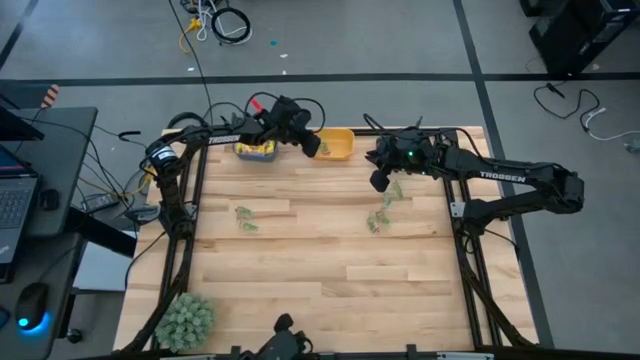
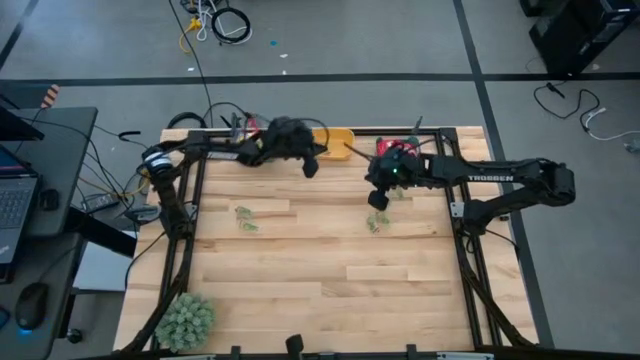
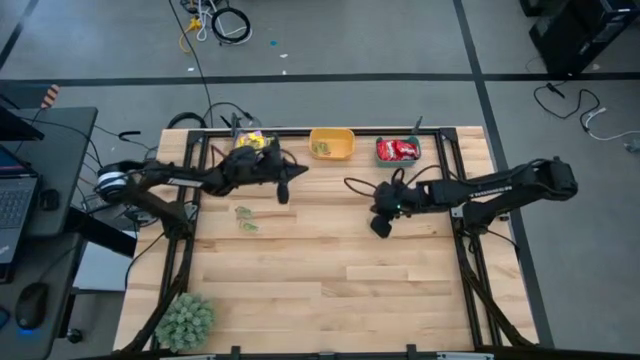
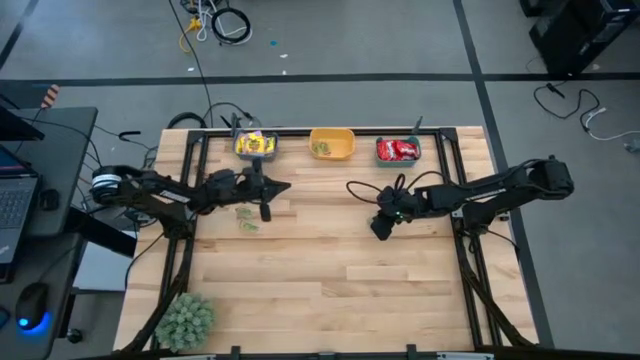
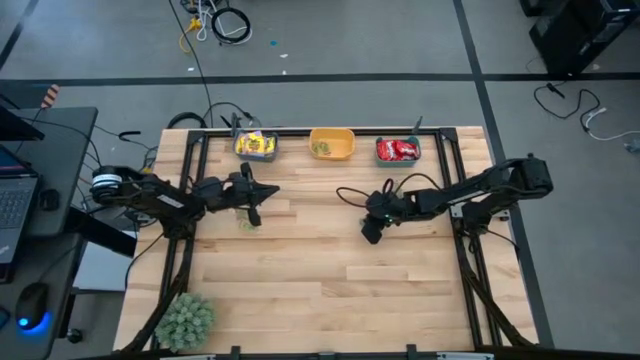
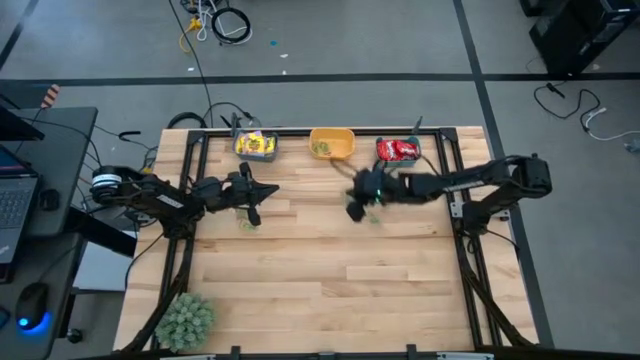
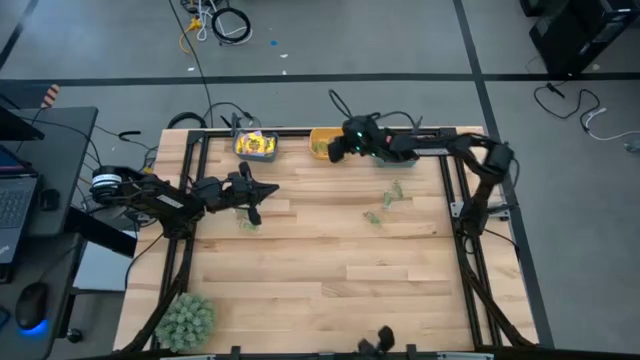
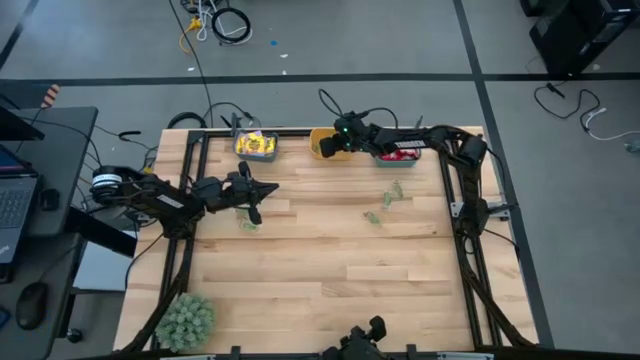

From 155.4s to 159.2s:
Task: Sort candy
Put the green gummy into the yellow bin

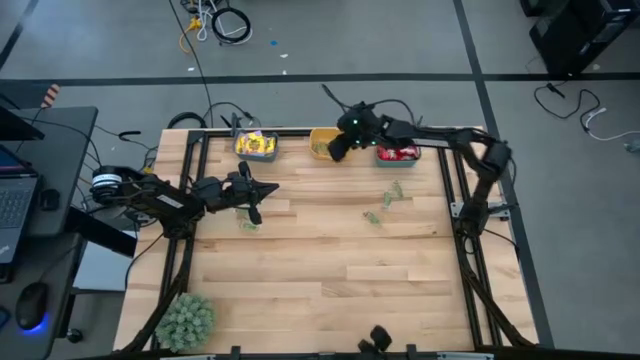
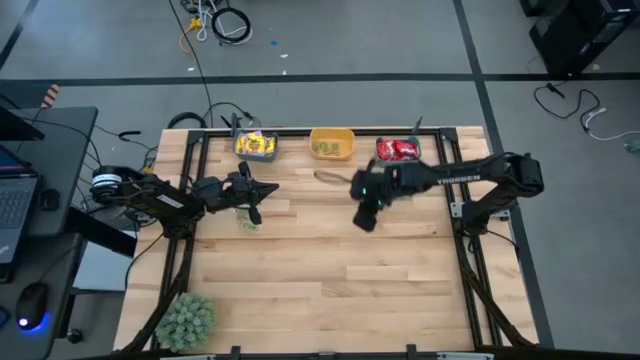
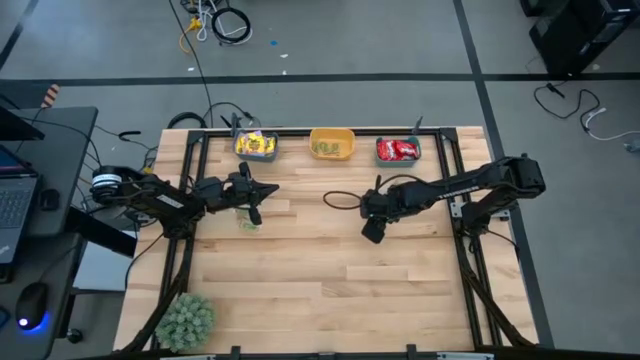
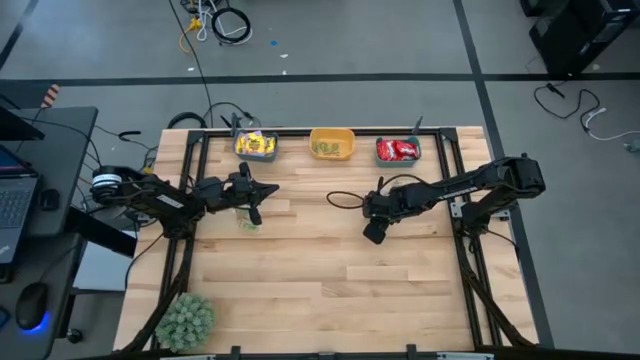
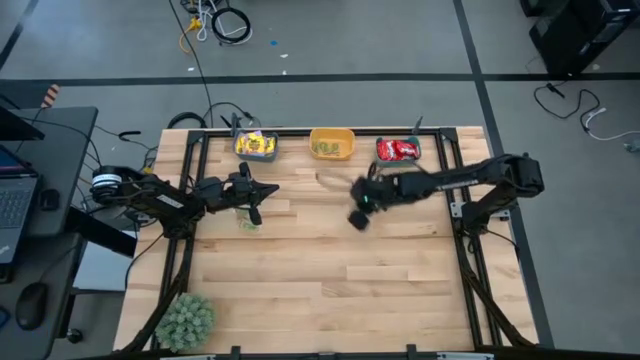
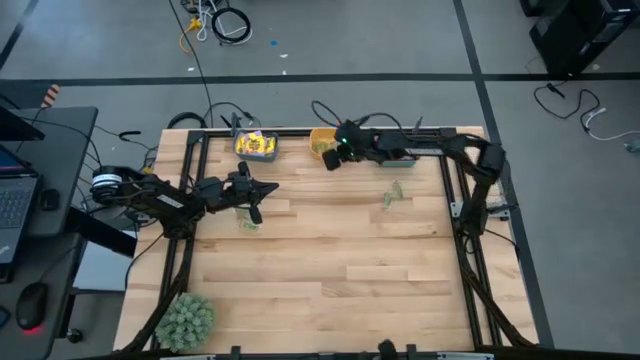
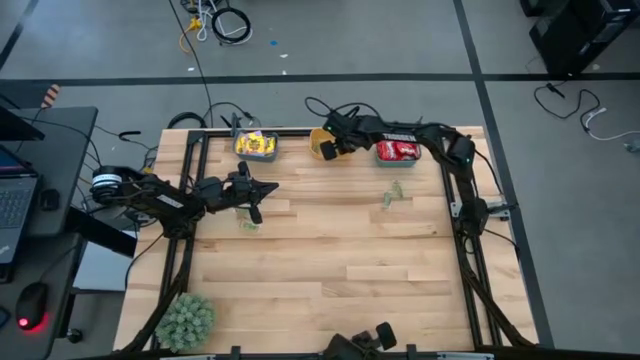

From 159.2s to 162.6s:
Put the green gummy into the yellow bin

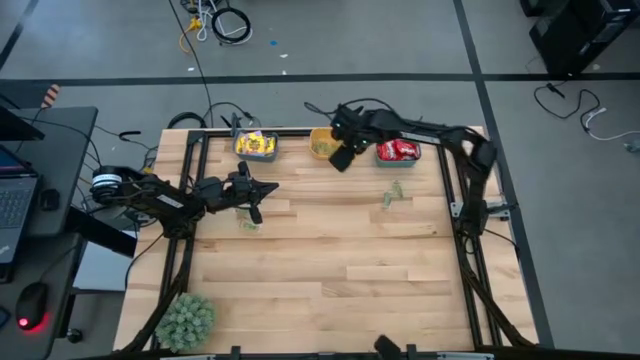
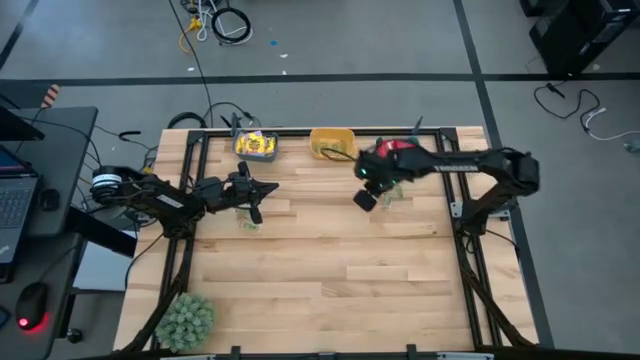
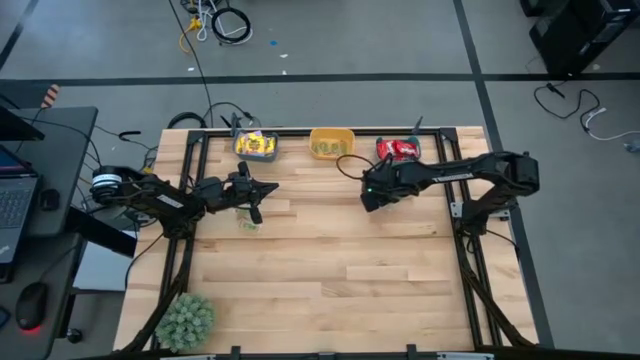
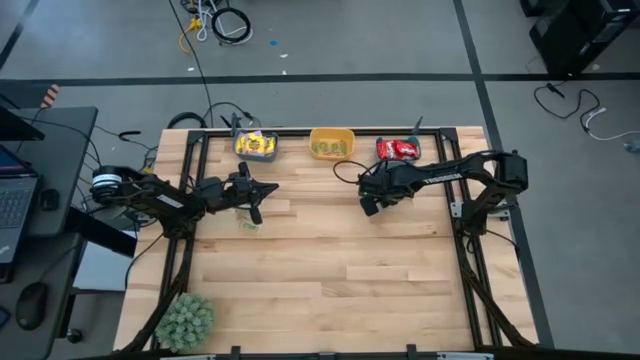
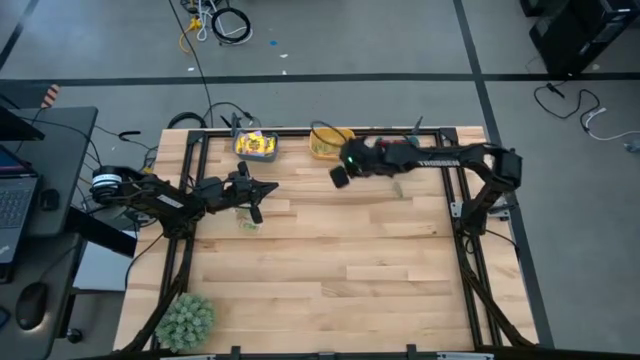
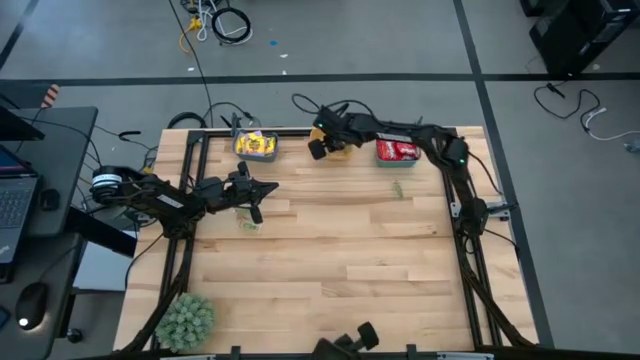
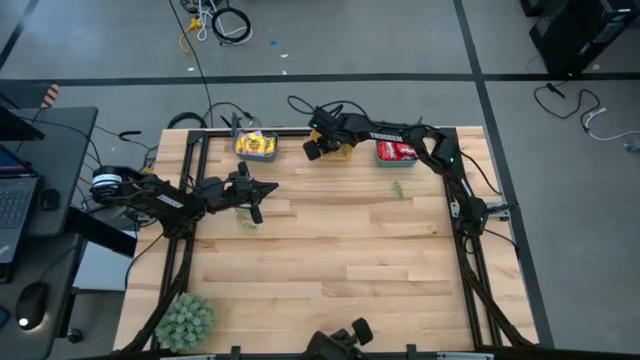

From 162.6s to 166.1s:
Put the green gummy into the yellow bin

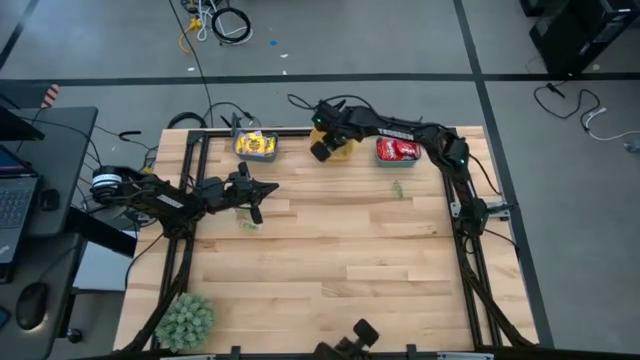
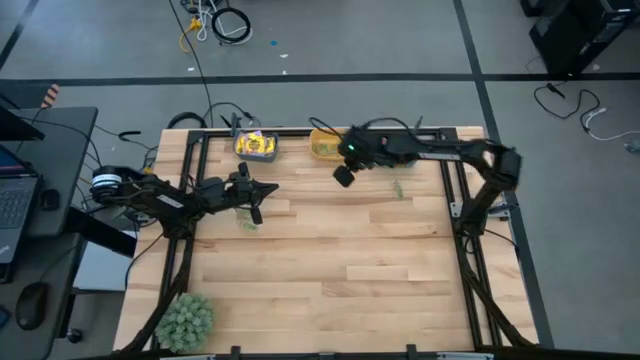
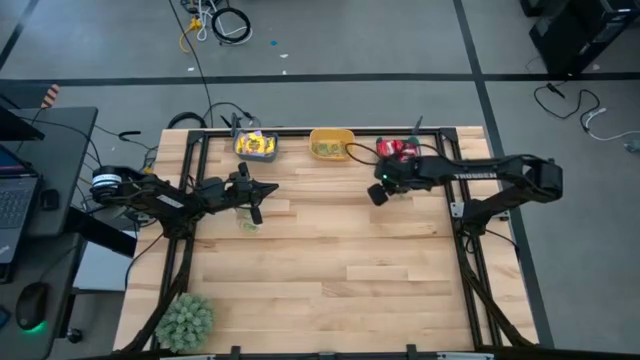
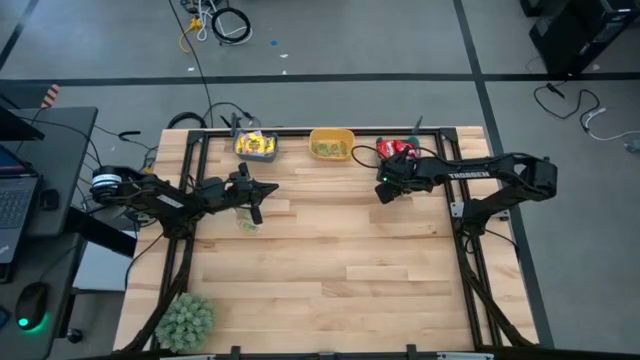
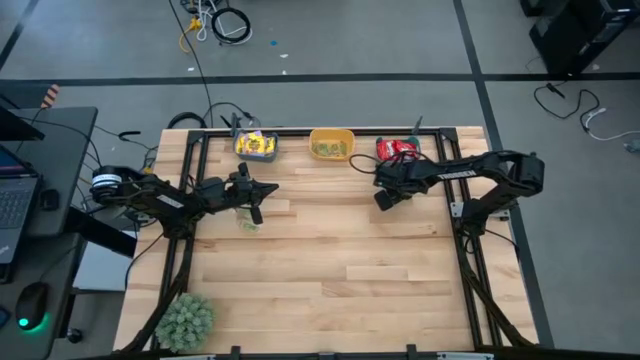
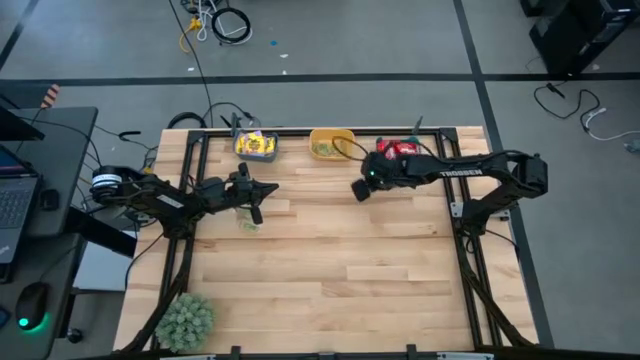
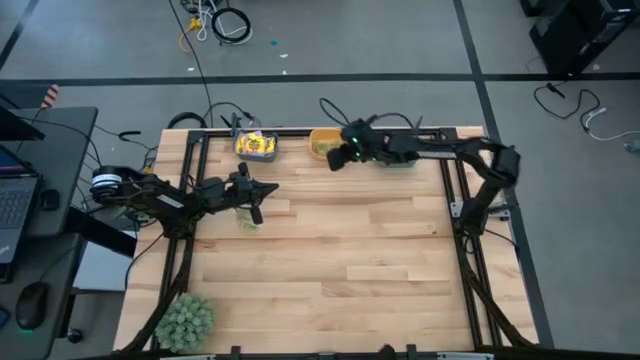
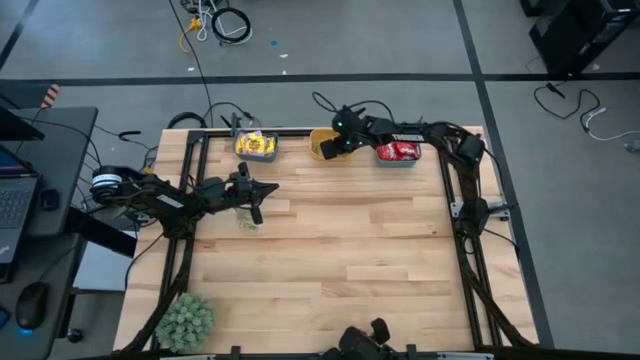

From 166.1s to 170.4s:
Put the green gummy into the yellow bin

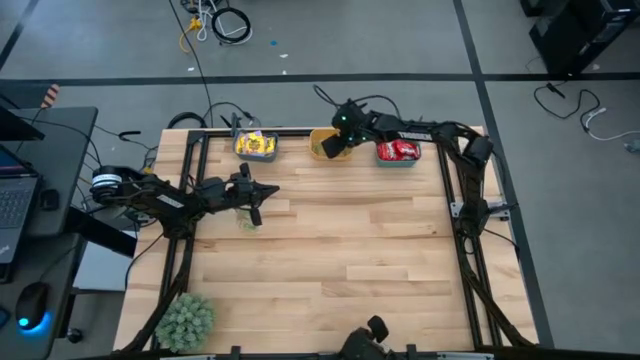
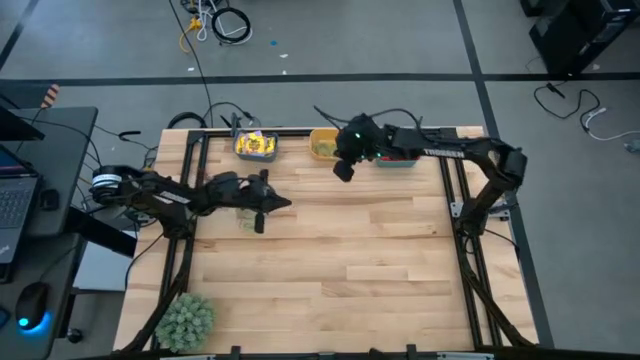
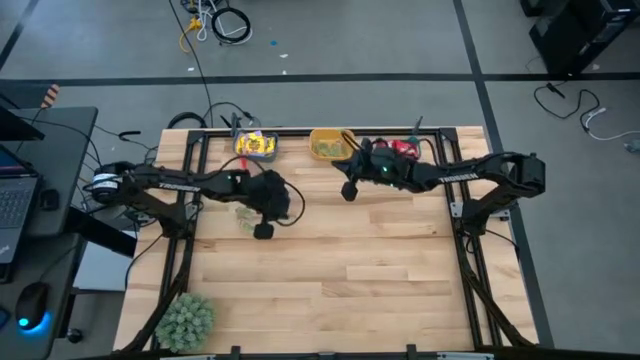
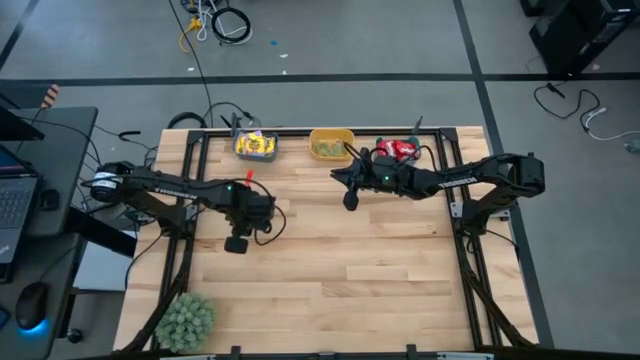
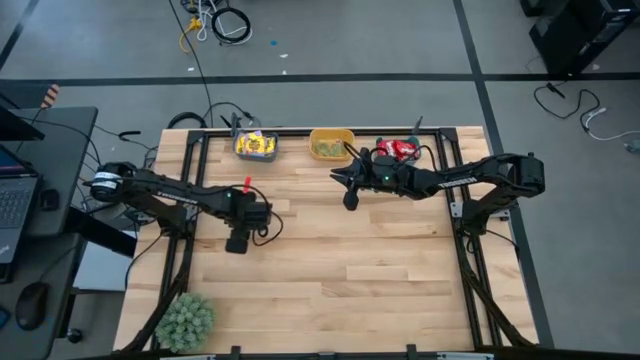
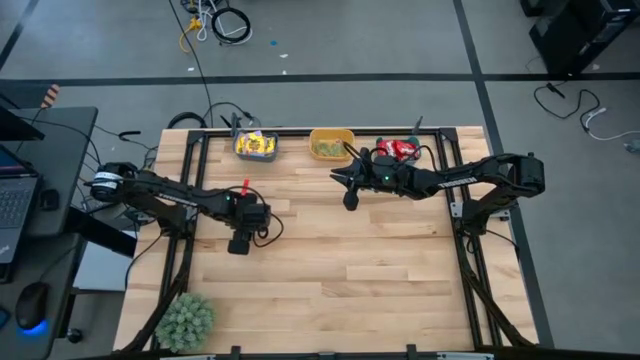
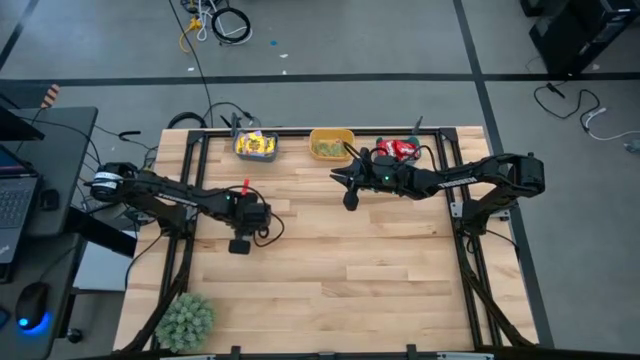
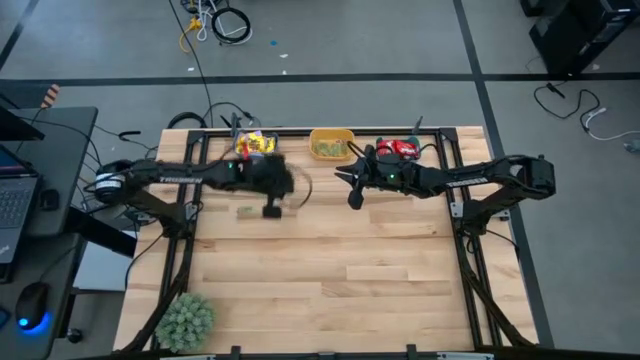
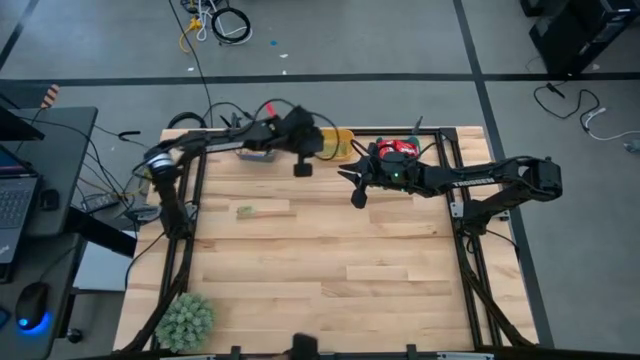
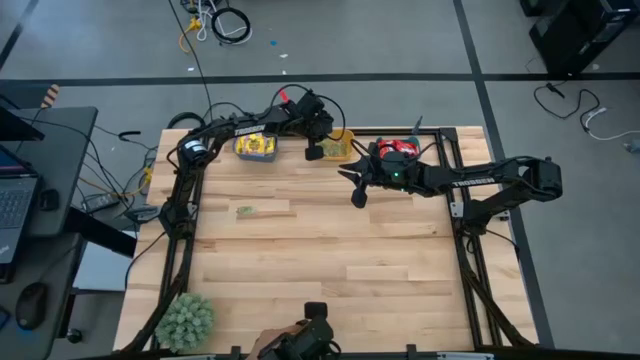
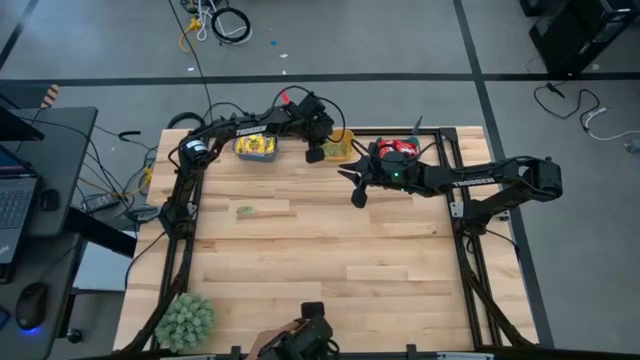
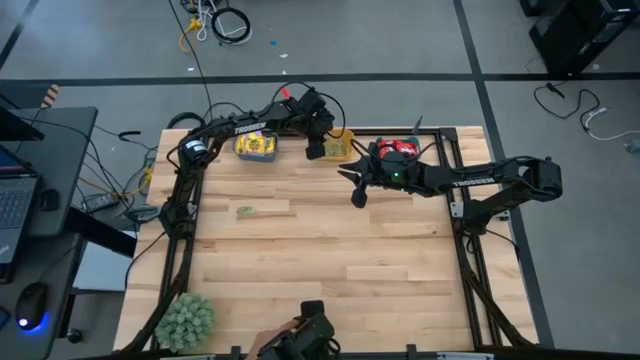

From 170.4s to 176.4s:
Put the green gummy into the yellow bin

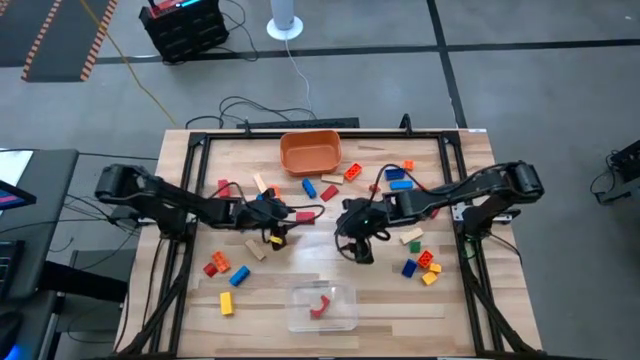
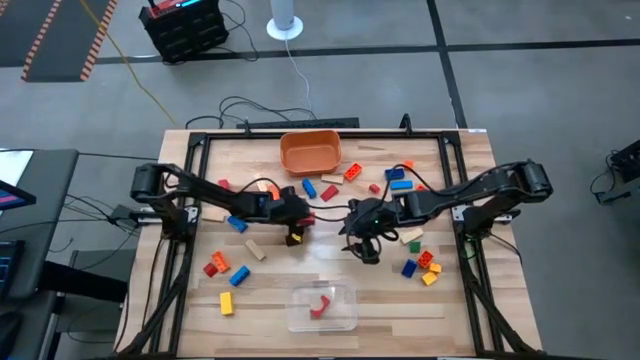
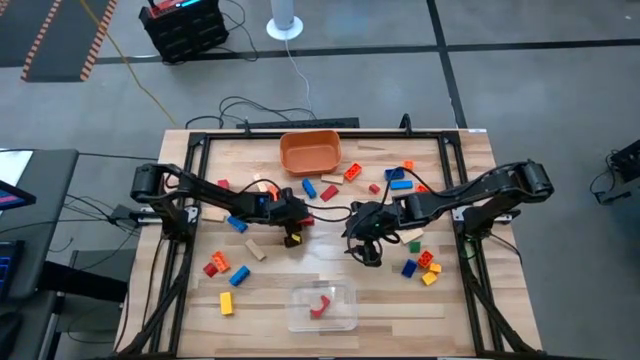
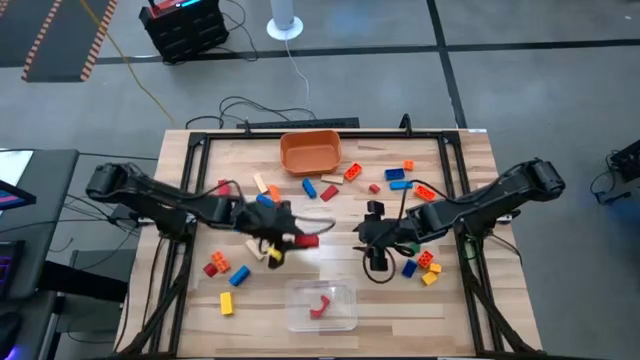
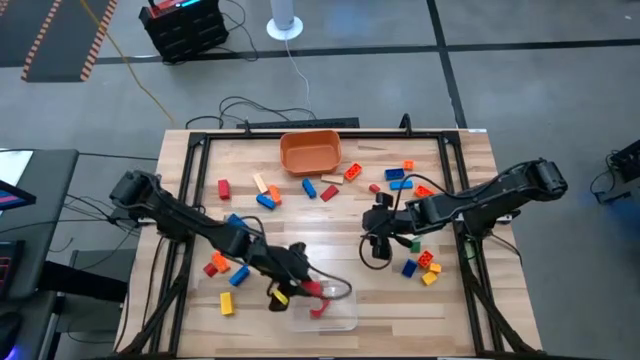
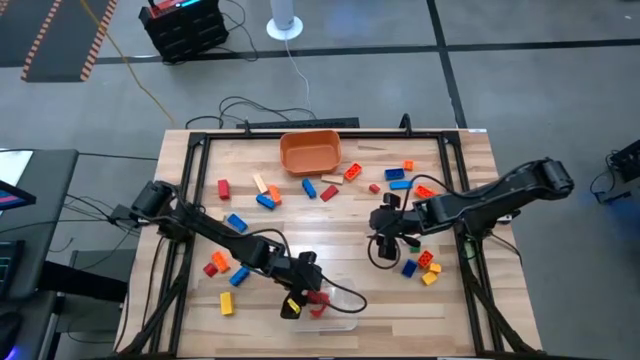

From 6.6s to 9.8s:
Task: Sort blocks by size
Put the large red wooden block into the transparent bin
